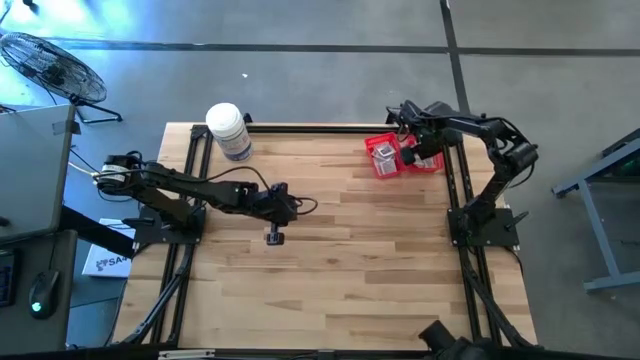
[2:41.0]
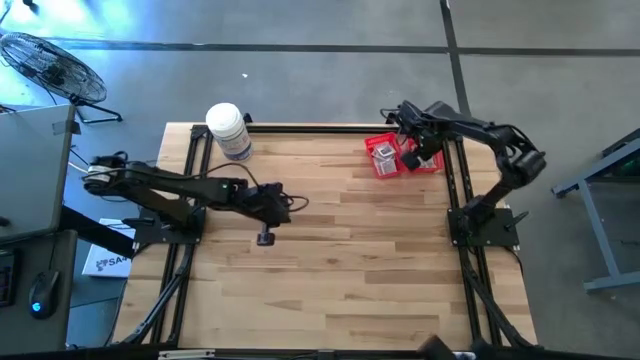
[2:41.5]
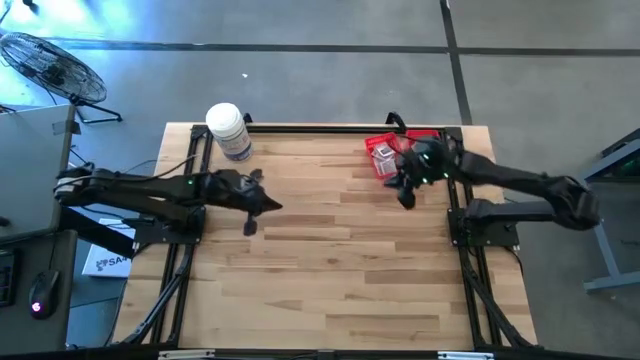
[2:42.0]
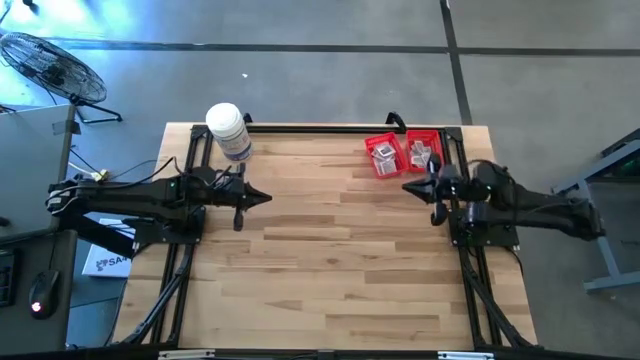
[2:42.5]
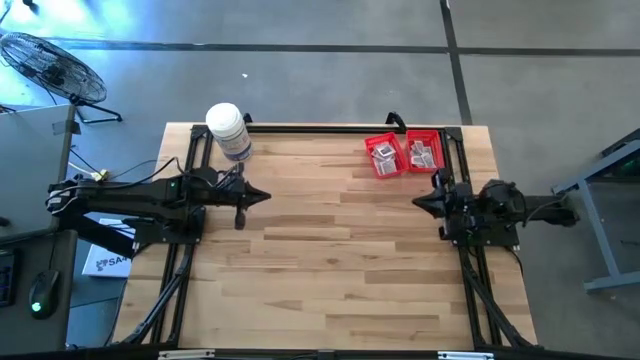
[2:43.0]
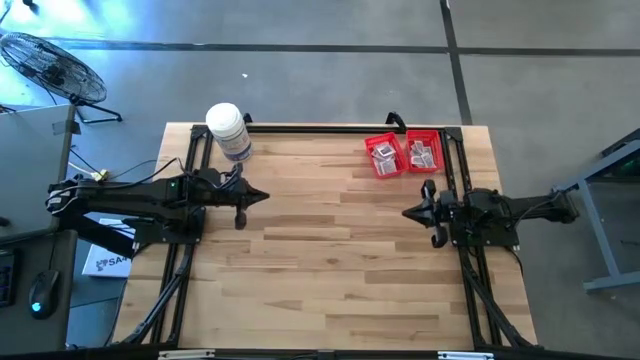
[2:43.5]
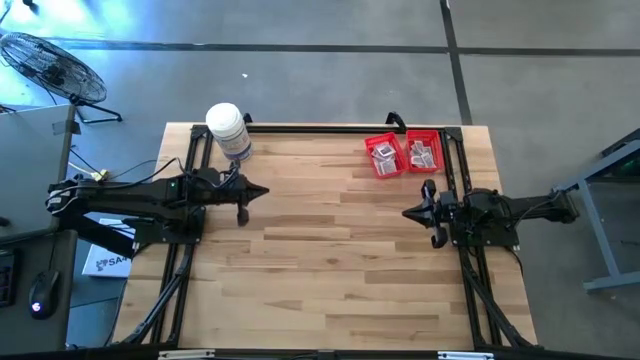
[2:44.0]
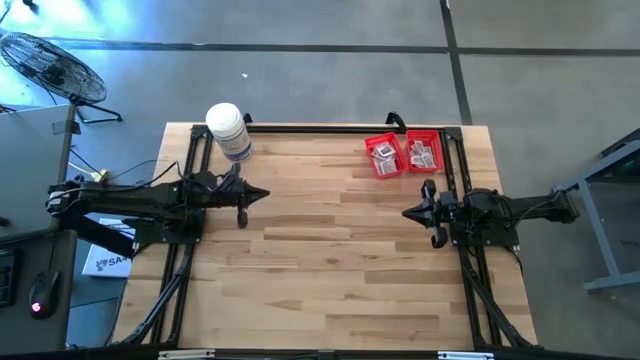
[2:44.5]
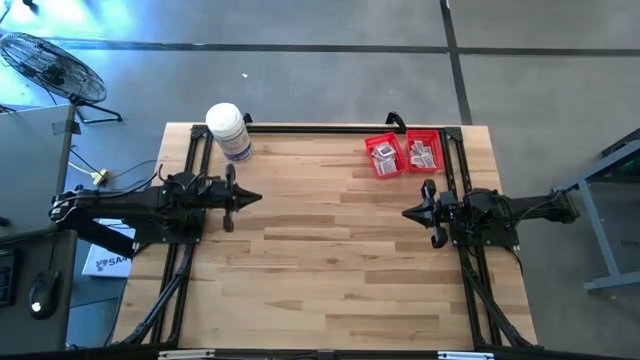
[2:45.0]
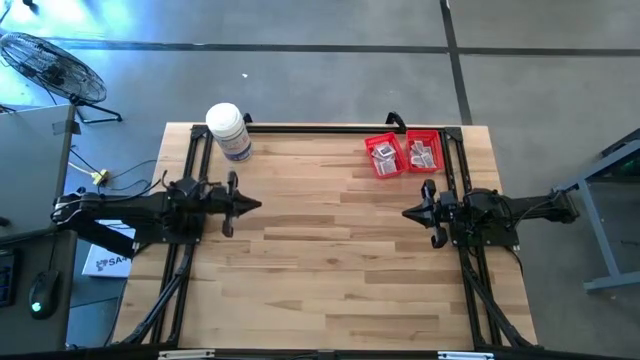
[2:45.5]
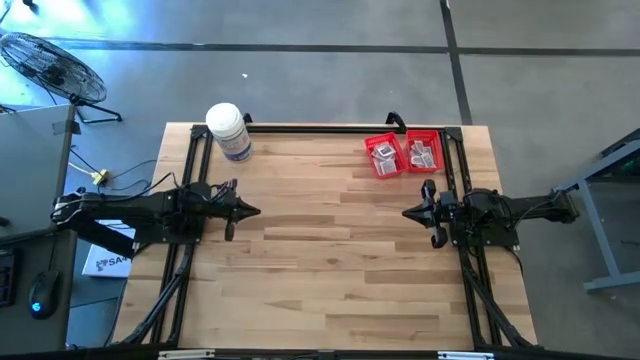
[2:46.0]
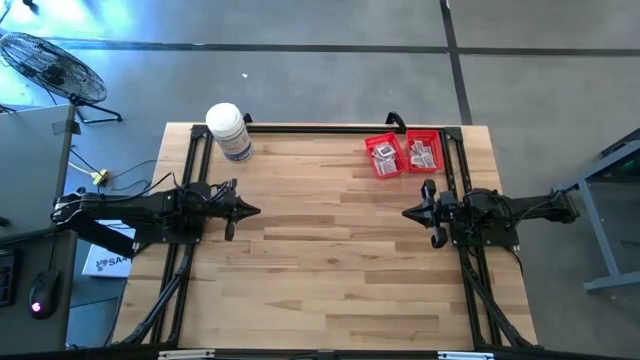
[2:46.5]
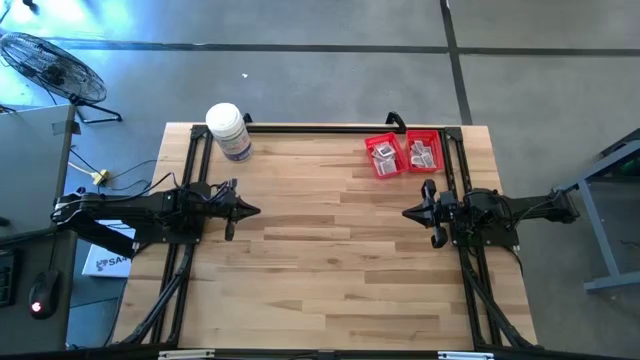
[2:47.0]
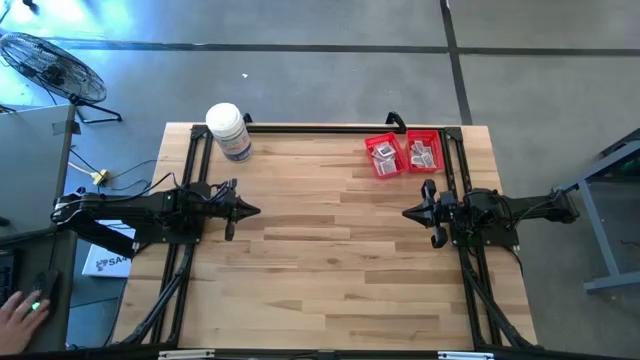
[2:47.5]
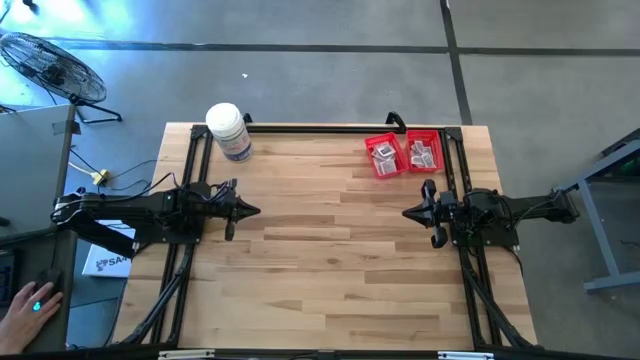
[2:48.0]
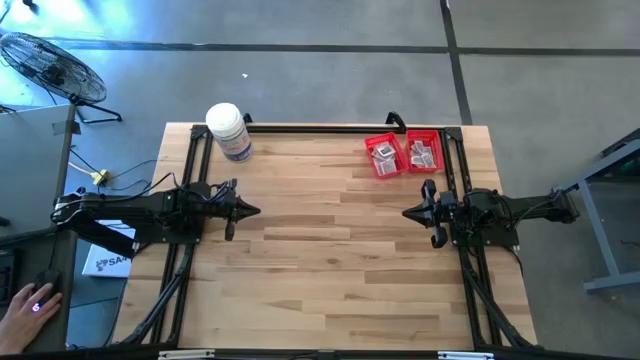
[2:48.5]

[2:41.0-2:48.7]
Task: Pick & Place First Aid Supplies
Return to Home Position

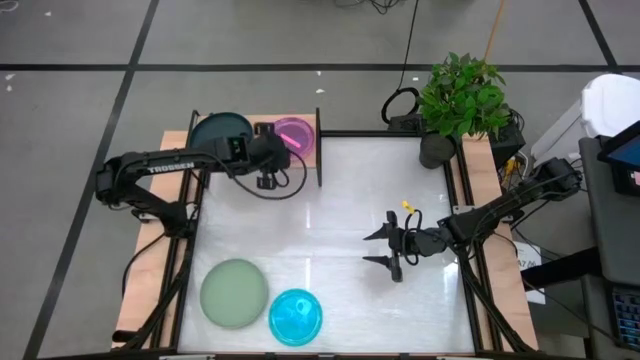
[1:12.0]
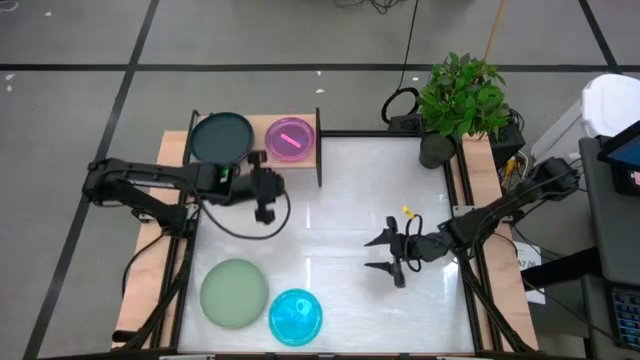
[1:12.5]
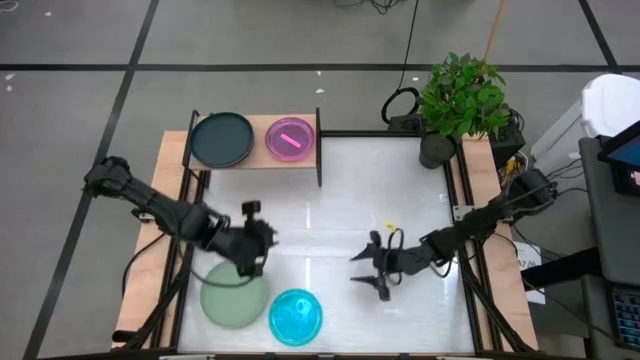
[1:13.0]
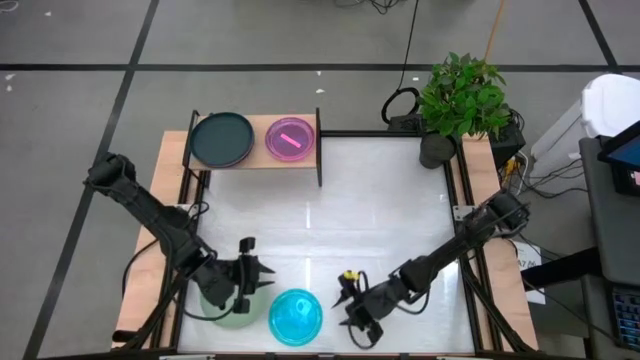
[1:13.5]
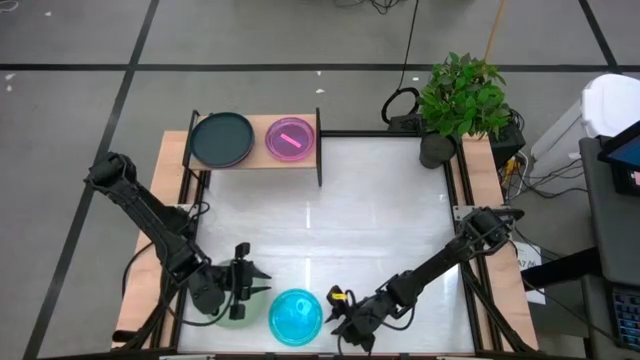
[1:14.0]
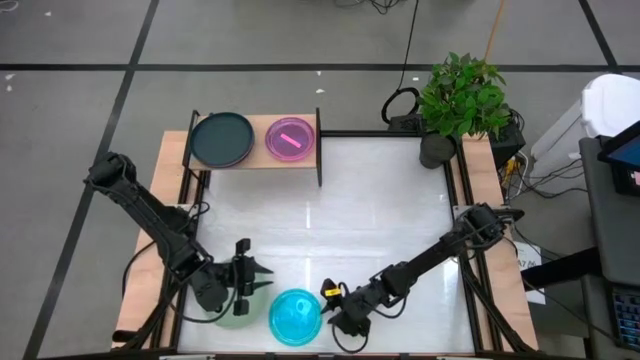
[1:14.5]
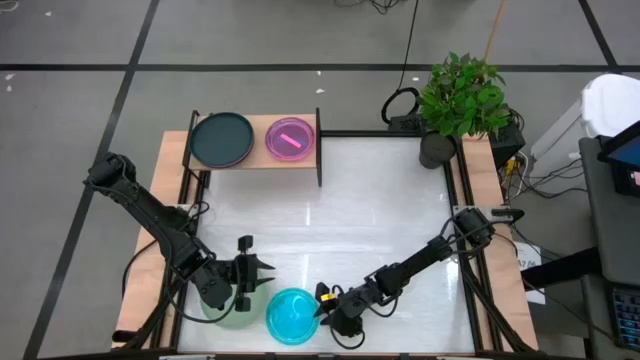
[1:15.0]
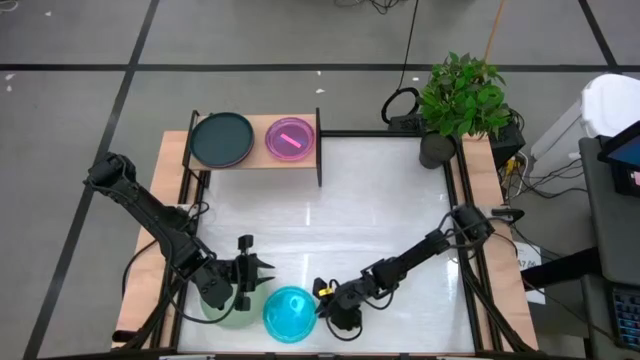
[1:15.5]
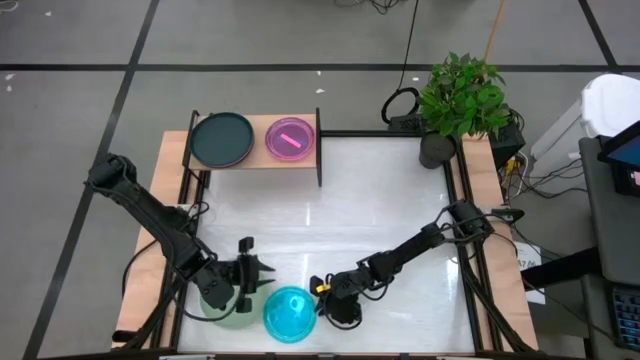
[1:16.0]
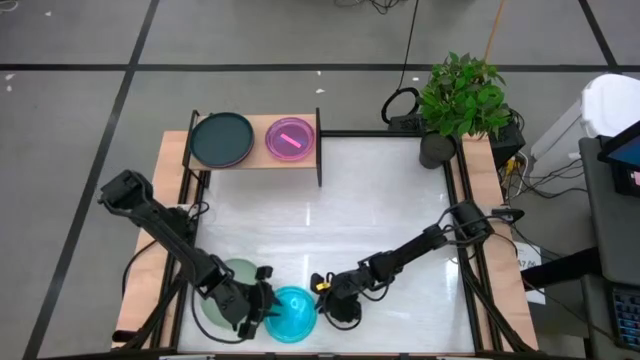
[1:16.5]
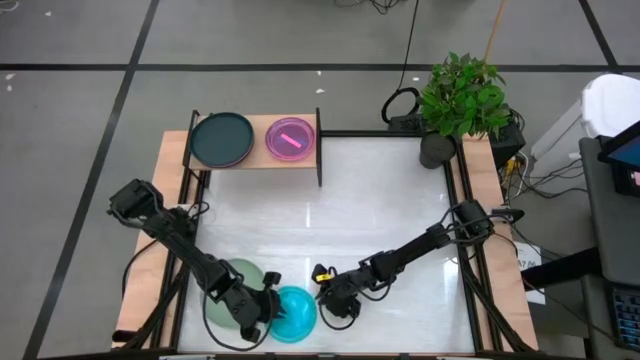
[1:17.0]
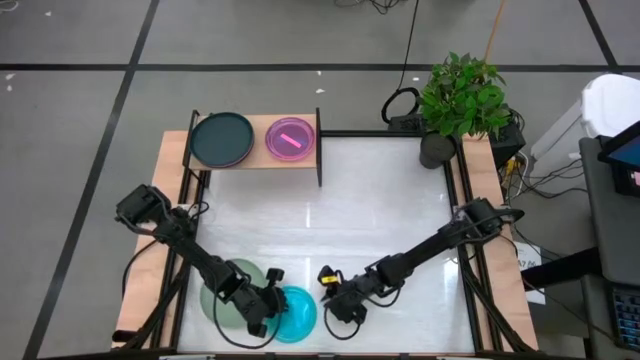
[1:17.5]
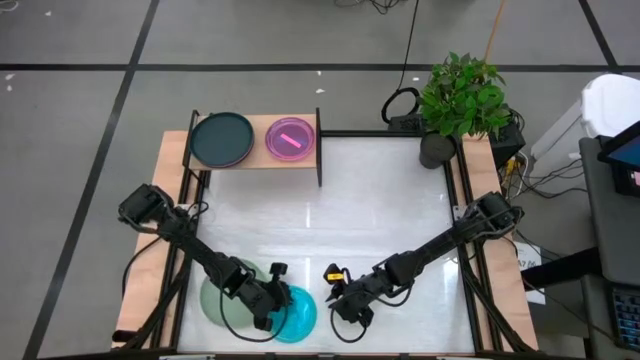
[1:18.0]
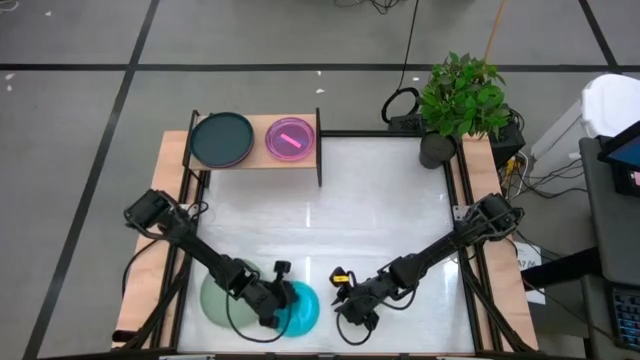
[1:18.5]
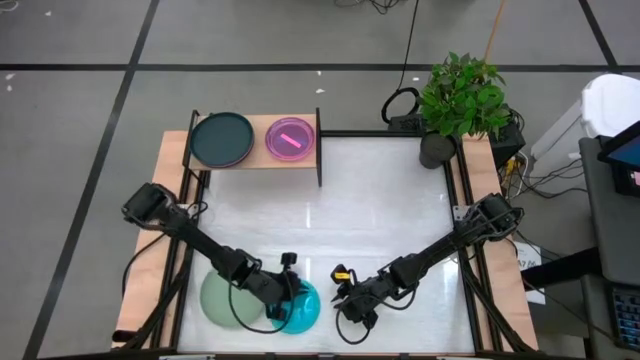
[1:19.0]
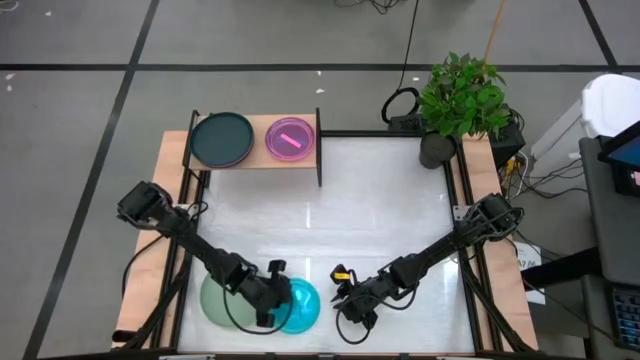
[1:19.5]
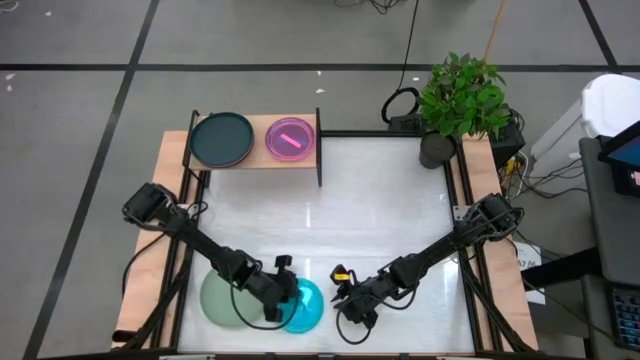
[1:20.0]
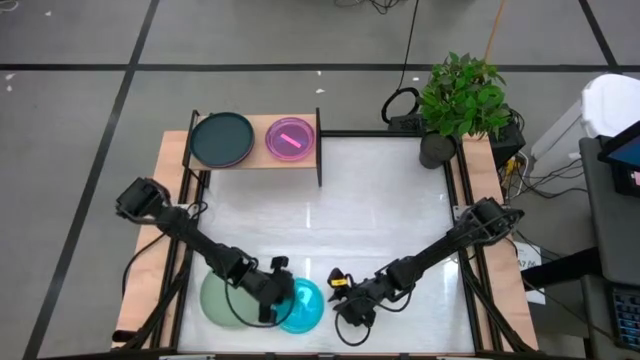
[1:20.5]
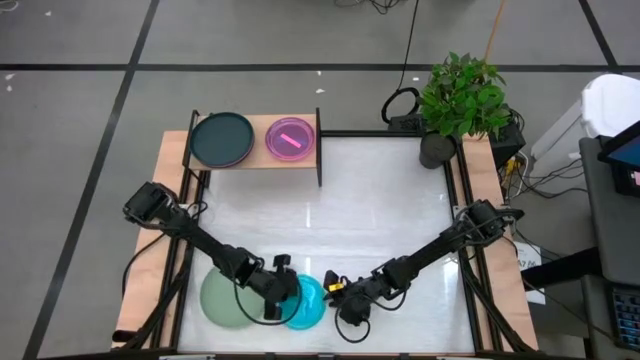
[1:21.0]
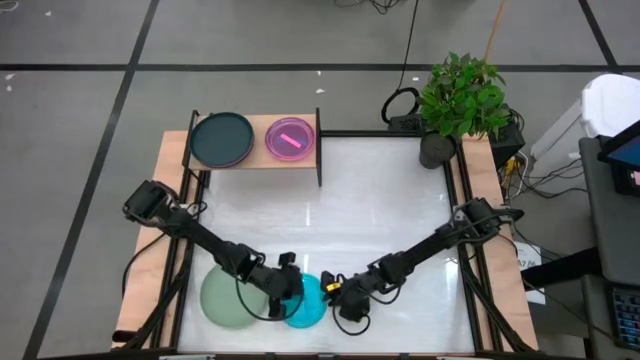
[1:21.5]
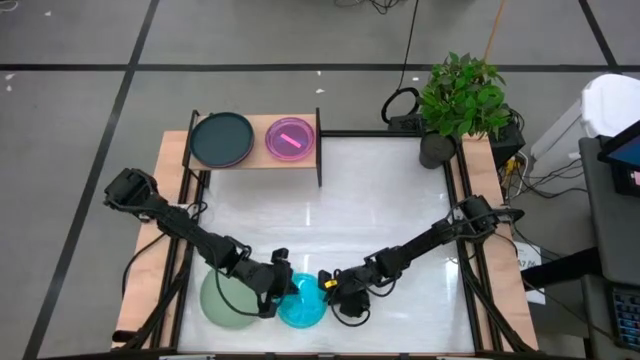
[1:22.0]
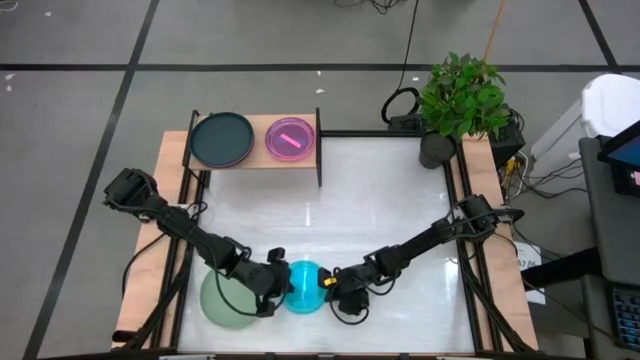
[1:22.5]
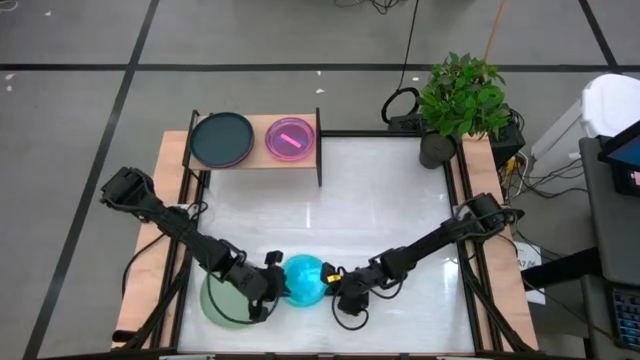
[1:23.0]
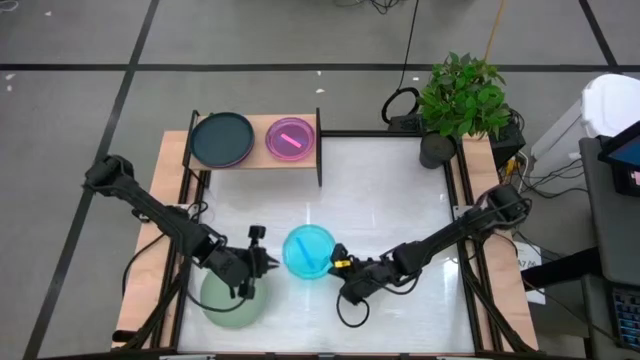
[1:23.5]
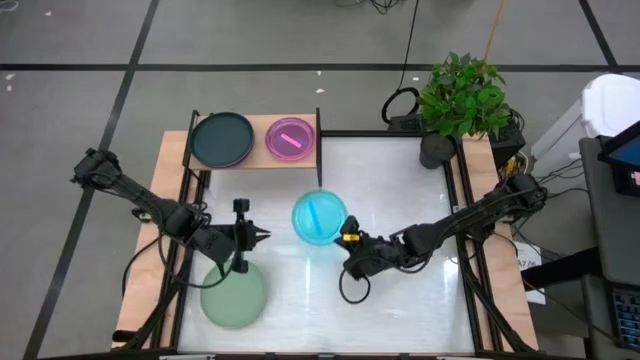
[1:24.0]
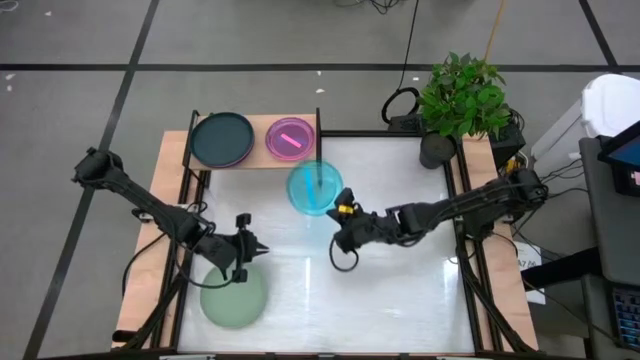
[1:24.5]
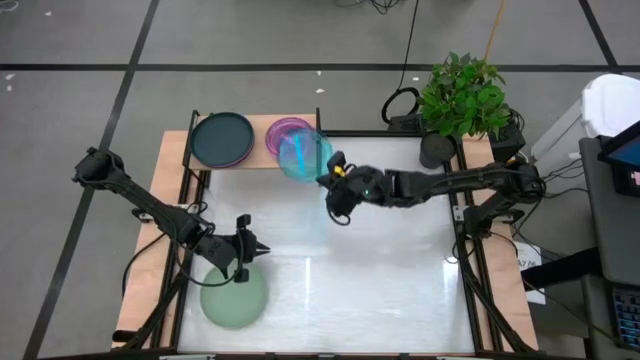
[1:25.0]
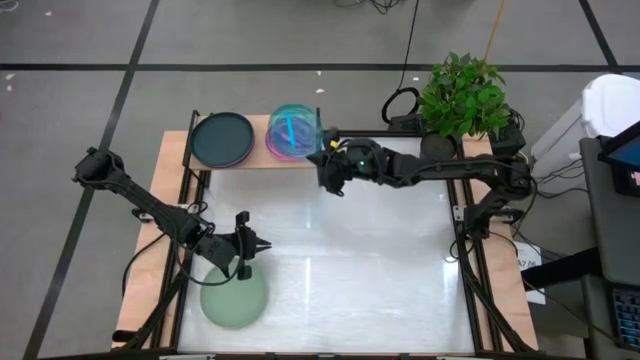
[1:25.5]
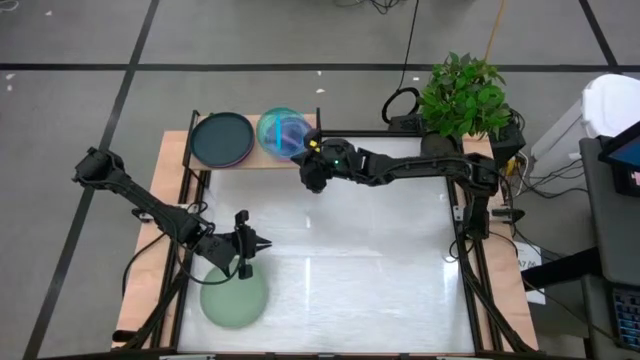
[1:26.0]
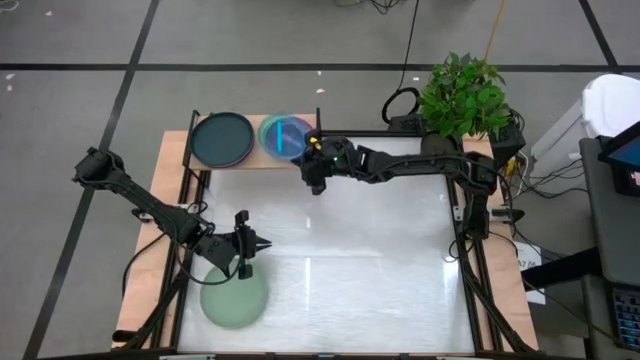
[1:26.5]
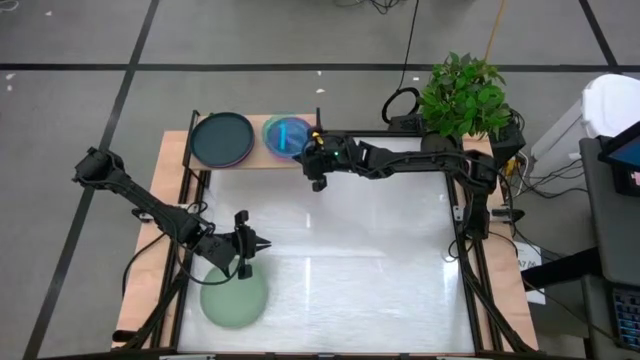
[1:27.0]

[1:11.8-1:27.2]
Task: Place and stack plates onto a shelf
Stack the blue transparent plate on top of the pink transparent plate on the shelf
